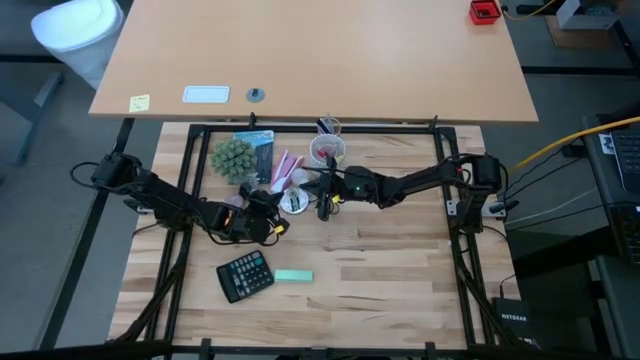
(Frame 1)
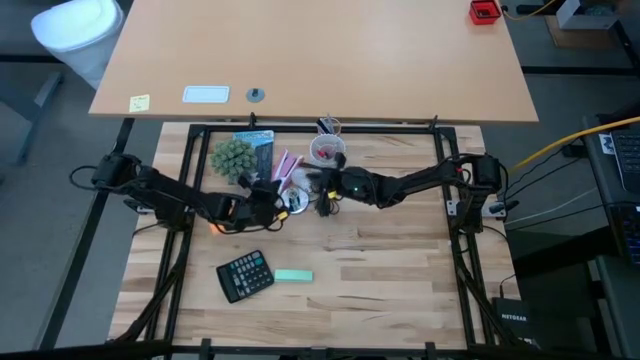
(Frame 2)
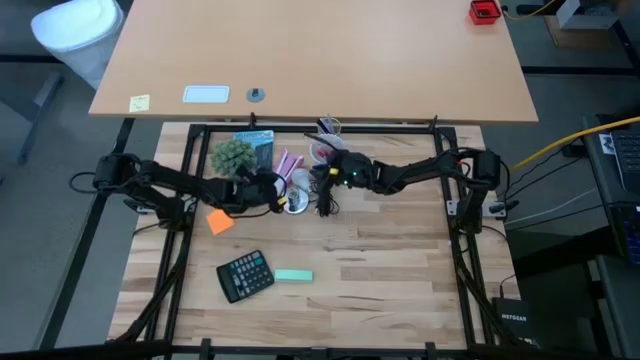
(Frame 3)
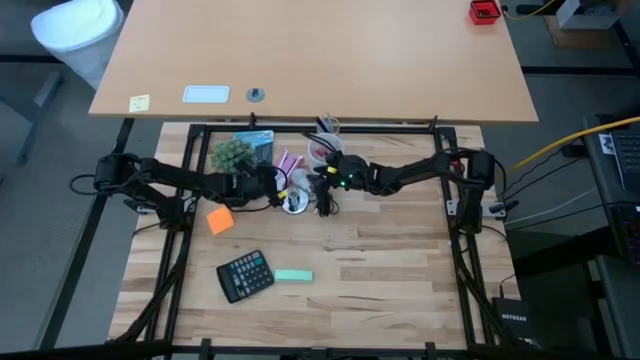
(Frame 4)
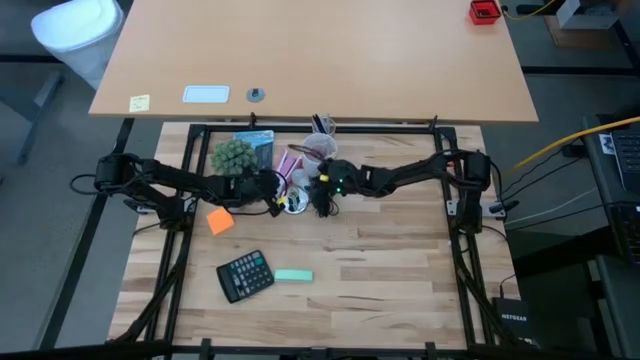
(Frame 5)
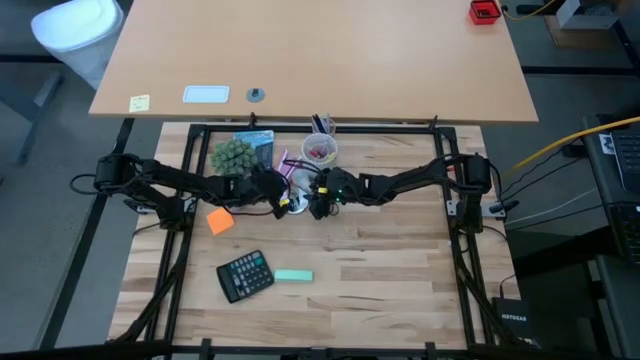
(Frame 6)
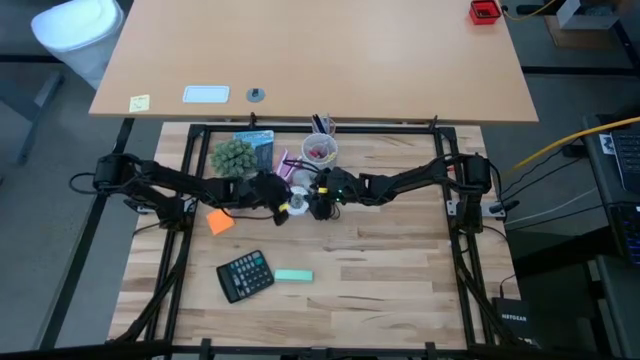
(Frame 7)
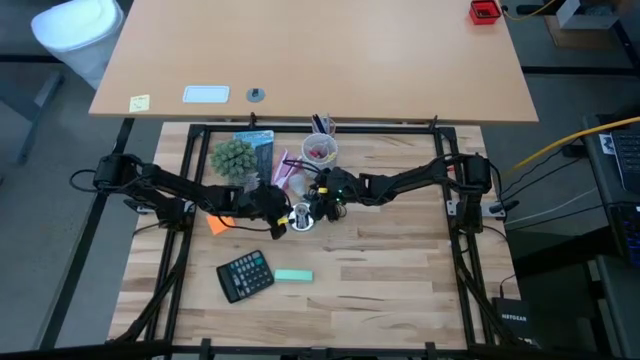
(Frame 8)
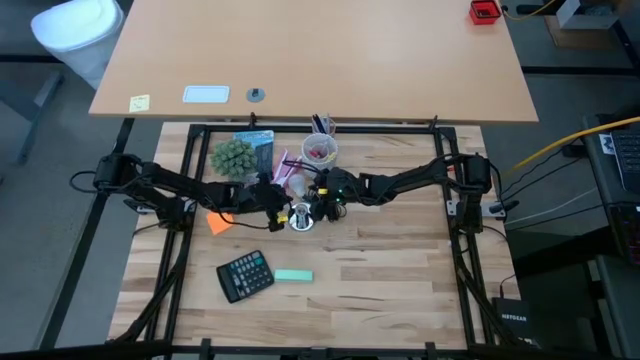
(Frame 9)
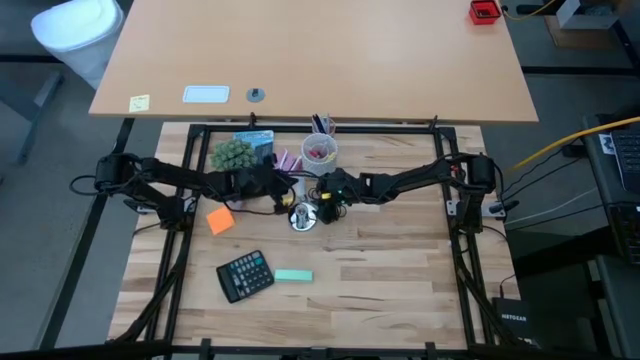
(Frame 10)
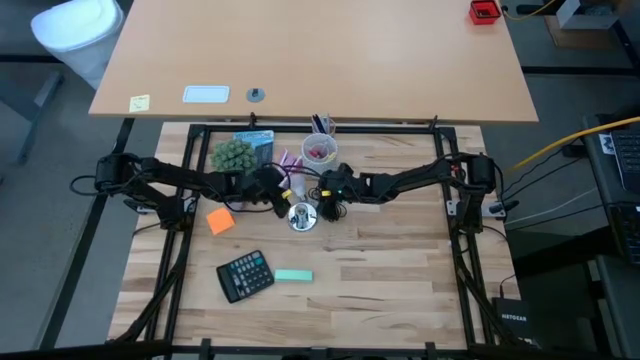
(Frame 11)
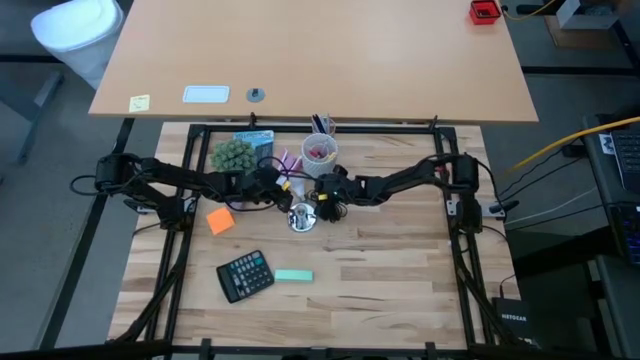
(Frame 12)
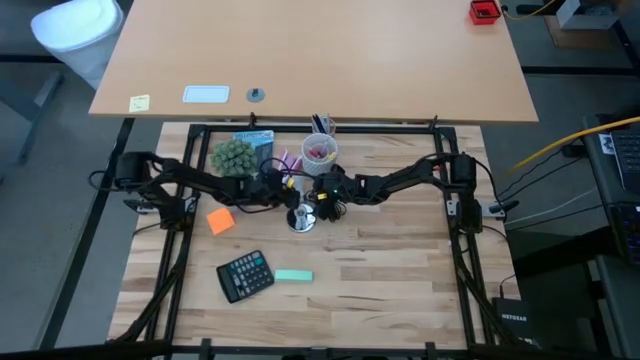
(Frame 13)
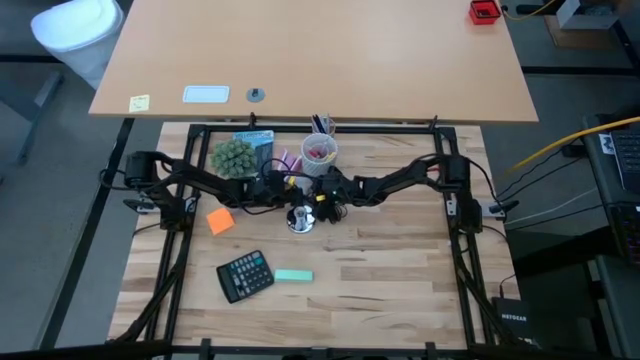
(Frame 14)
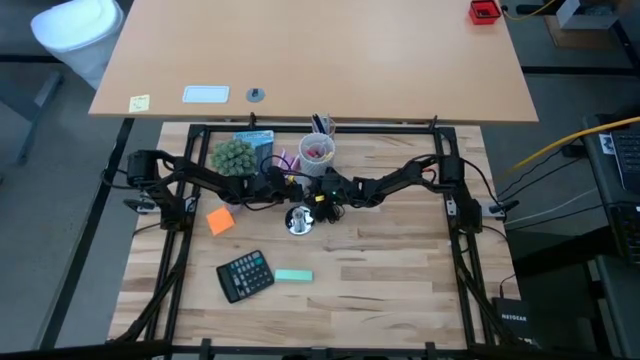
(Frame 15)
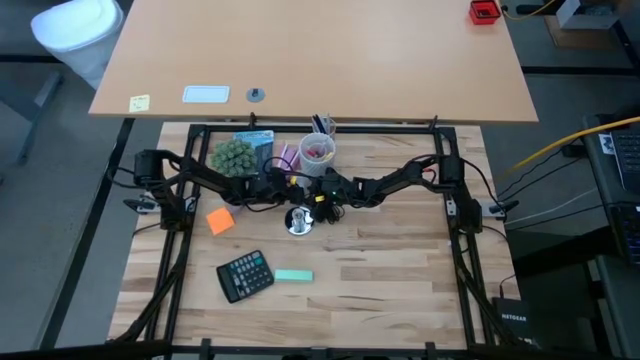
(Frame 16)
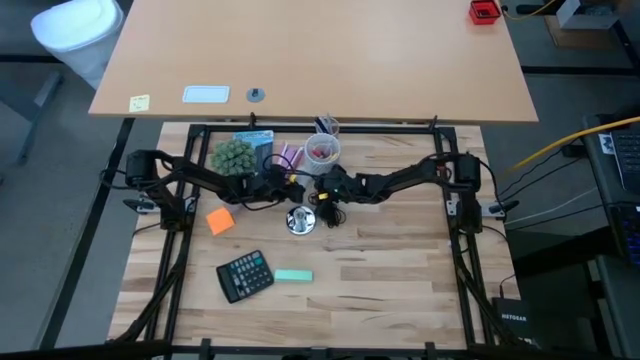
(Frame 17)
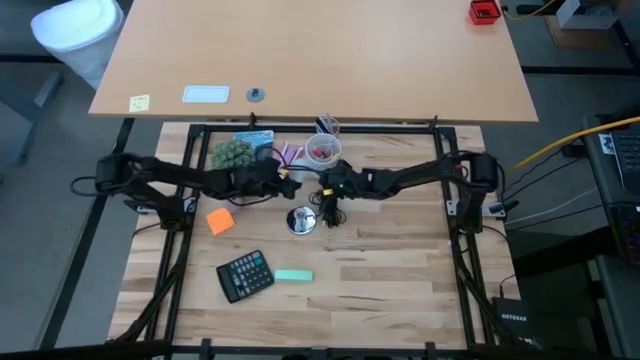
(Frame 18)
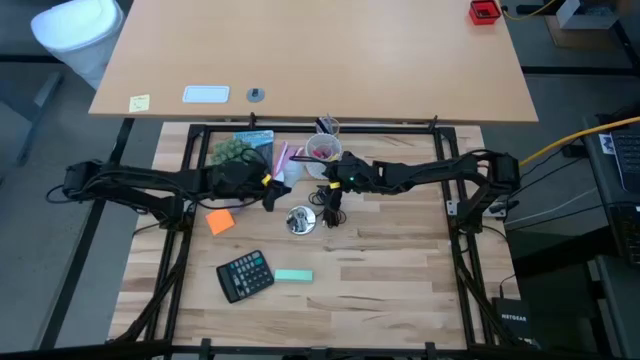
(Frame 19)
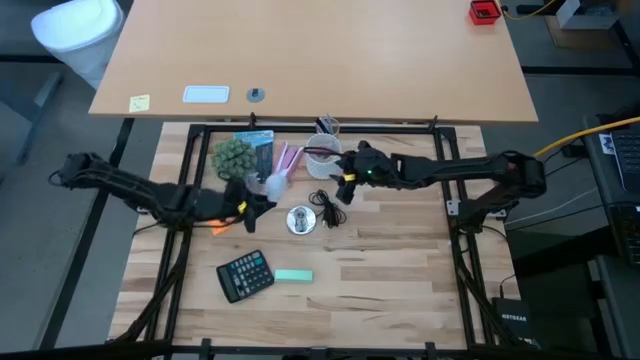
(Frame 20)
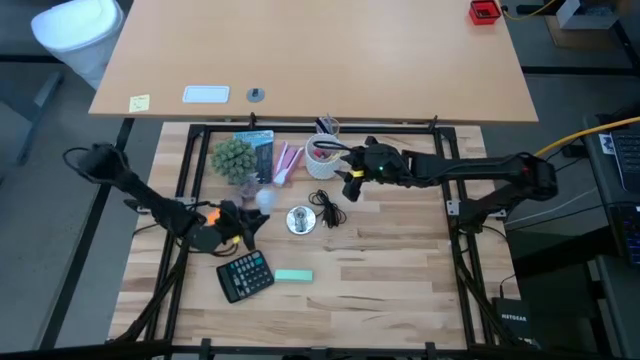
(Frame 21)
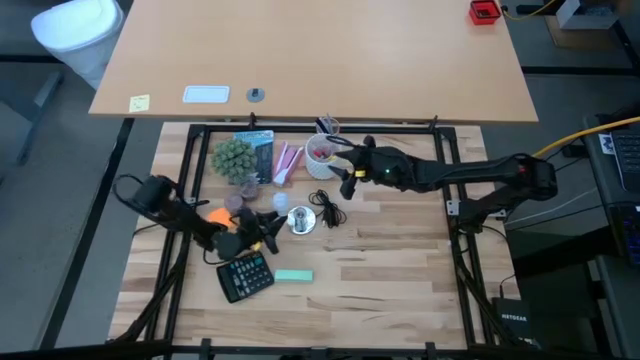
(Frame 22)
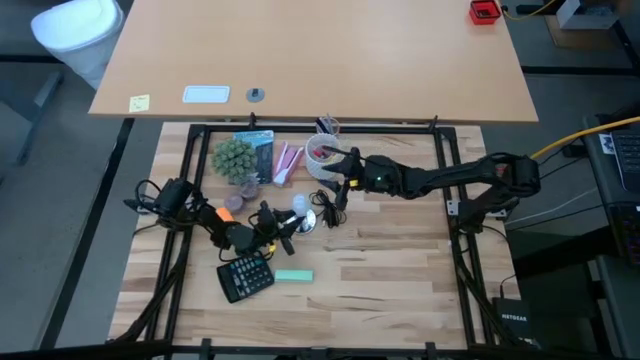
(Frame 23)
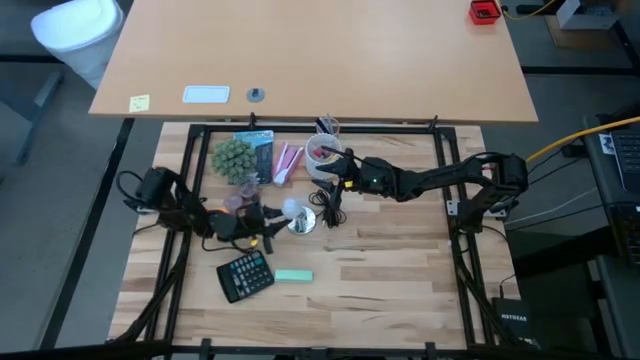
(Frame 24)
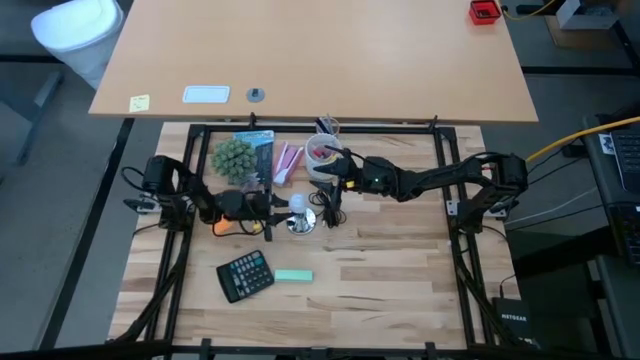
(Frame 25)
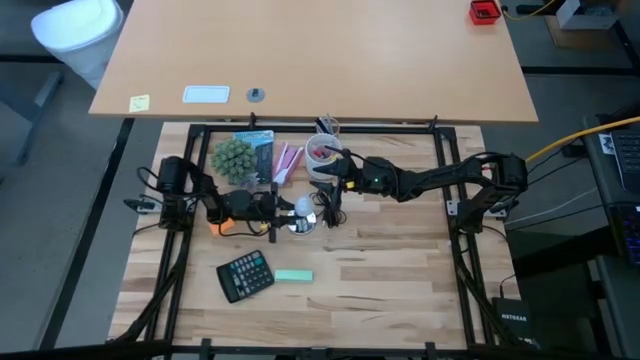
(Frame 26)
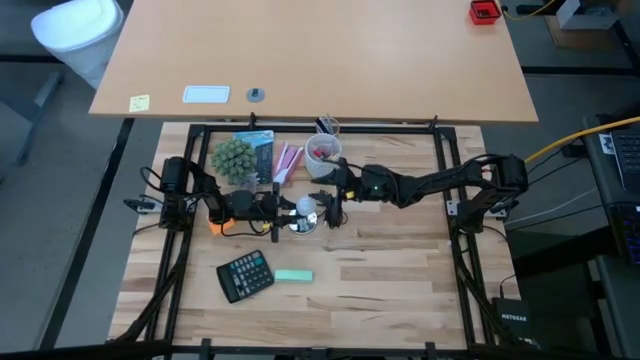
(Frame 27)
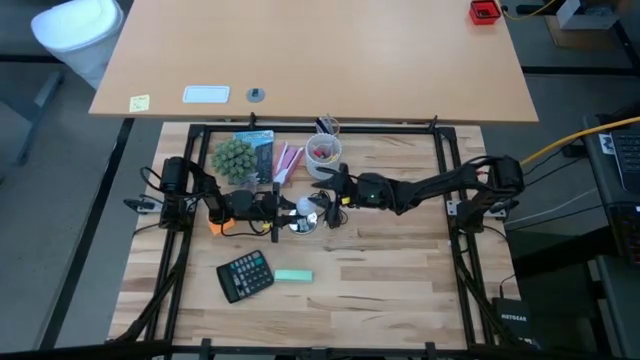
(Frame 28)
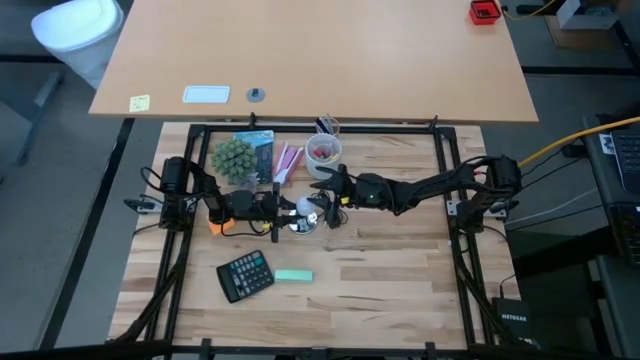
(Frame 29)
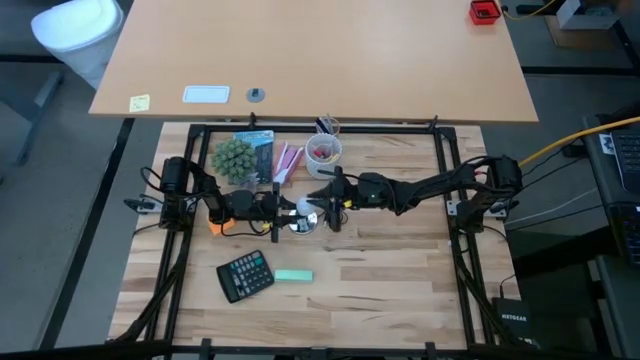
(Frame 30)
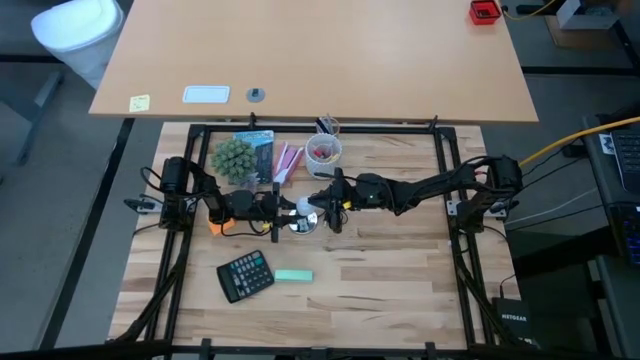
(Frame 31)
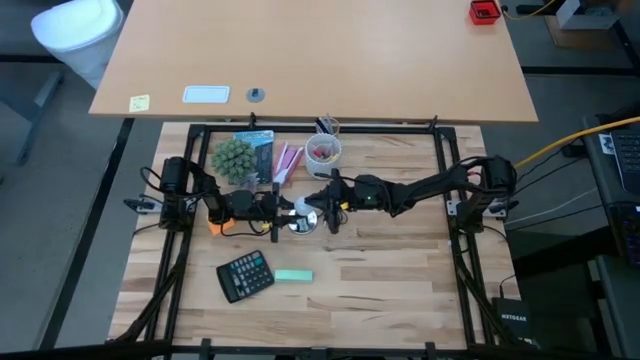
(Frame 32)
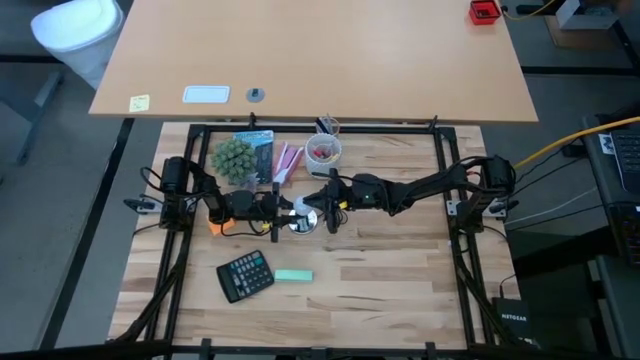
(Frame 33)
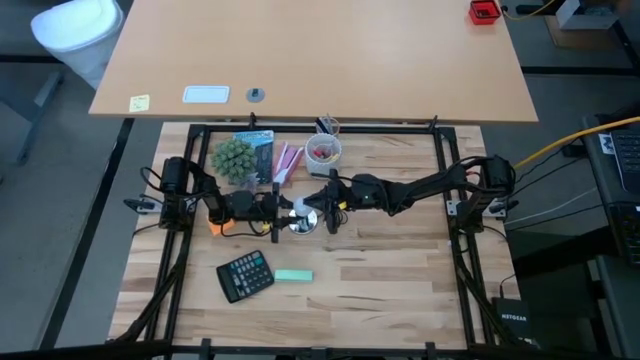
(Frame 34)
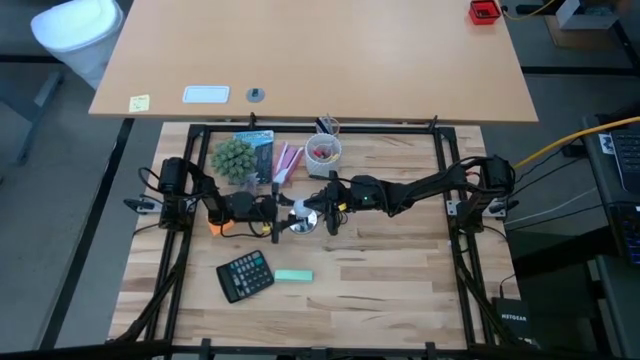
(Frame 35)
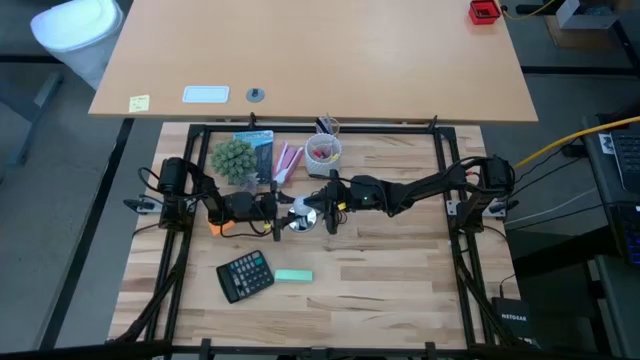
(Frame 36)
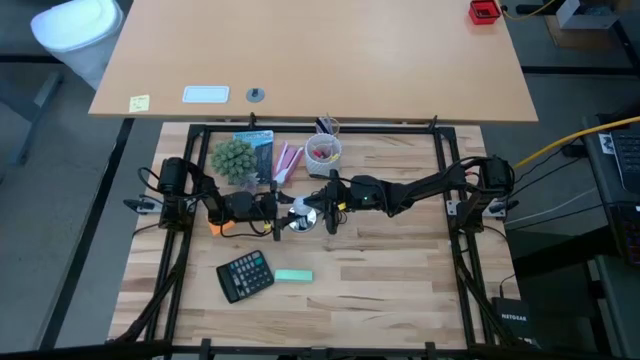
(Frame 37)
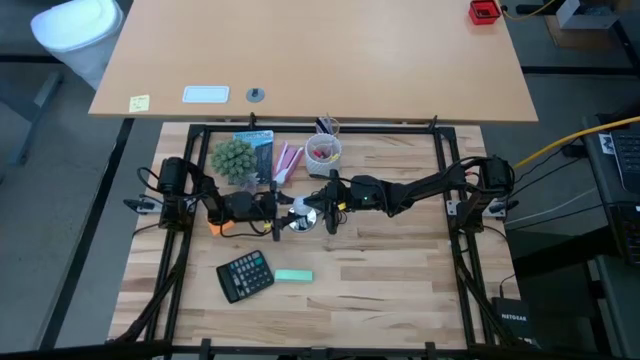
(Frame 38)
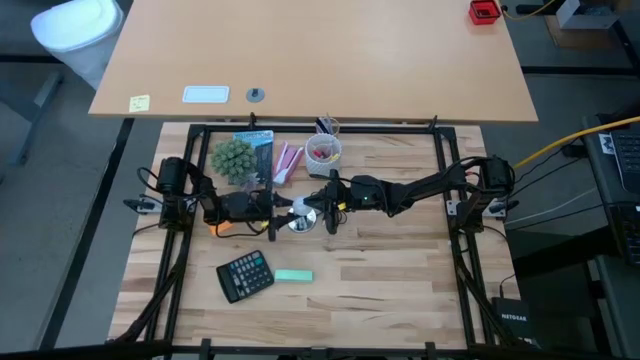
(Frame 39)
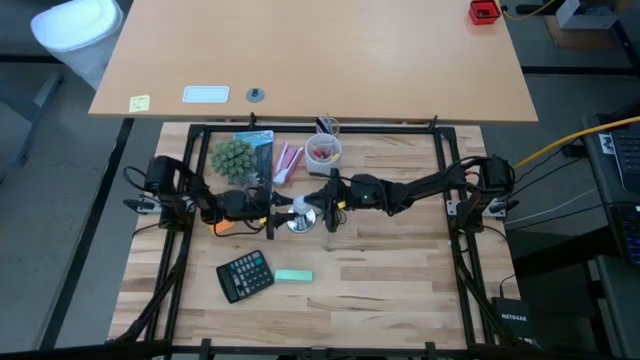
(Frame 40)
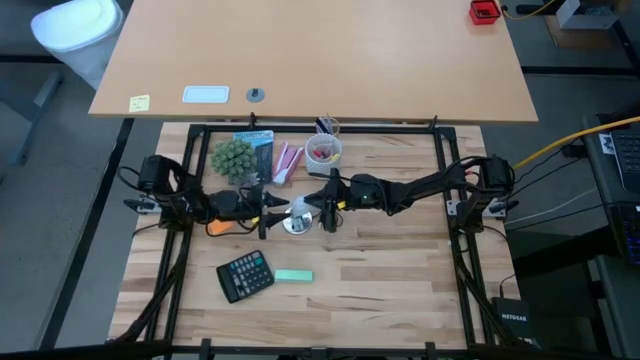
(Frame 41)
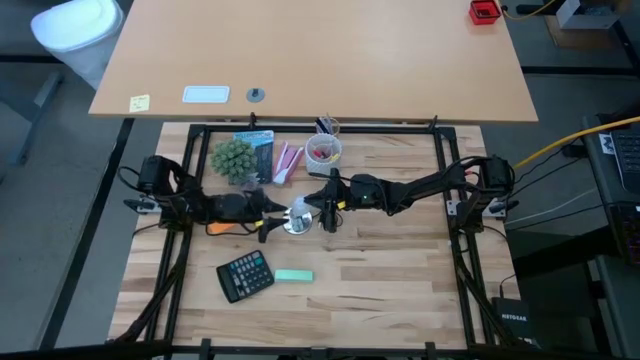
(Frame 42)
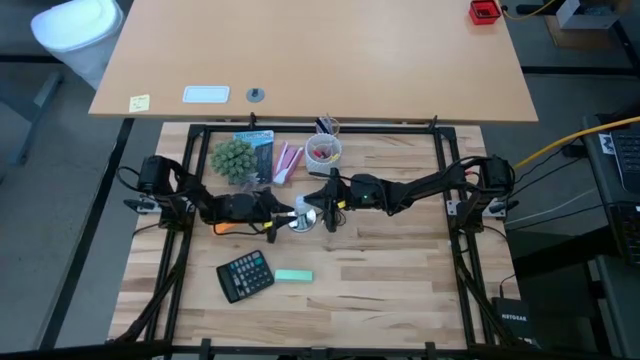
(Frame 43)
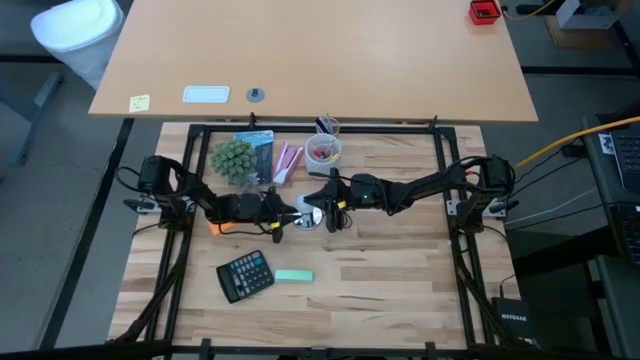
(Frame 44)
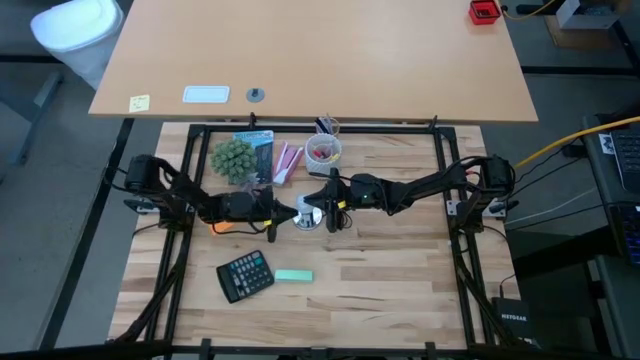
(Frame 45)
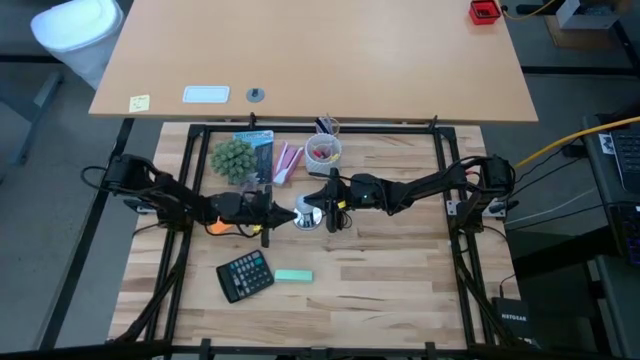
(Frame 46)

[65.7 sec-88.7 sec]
Task: Screw lightbulb
Insert the lightbulb into the lamp
